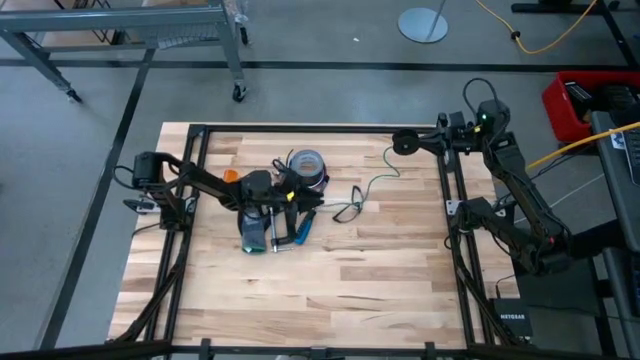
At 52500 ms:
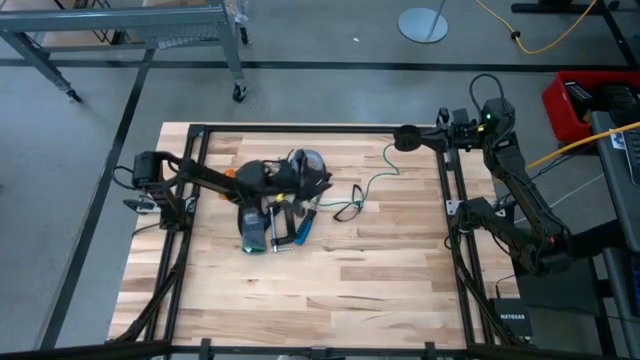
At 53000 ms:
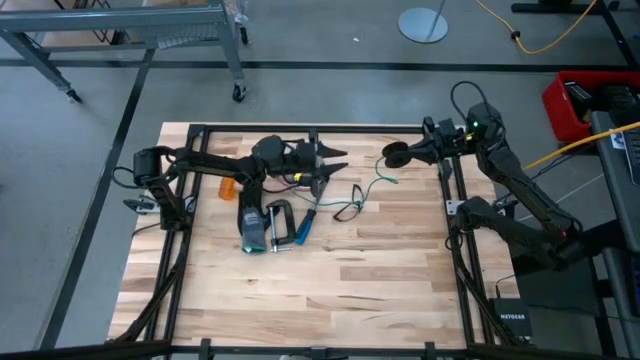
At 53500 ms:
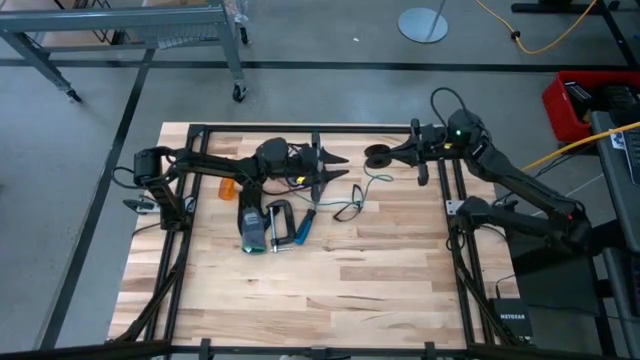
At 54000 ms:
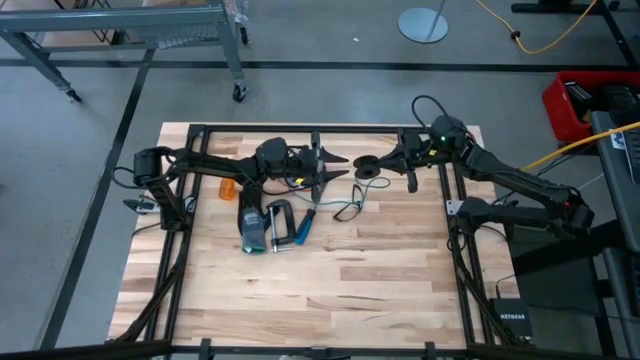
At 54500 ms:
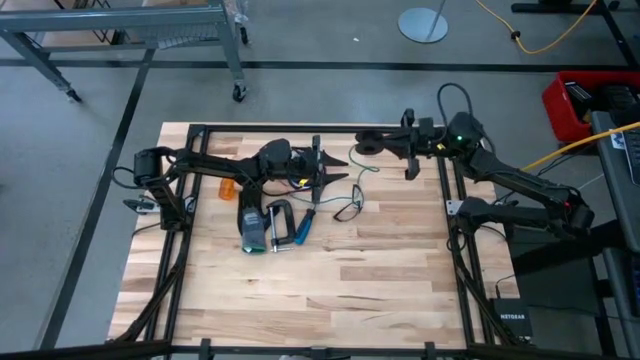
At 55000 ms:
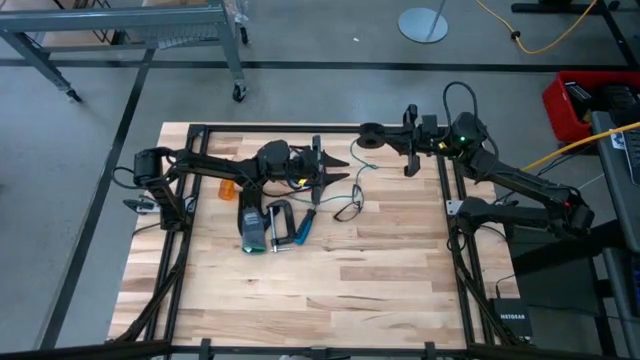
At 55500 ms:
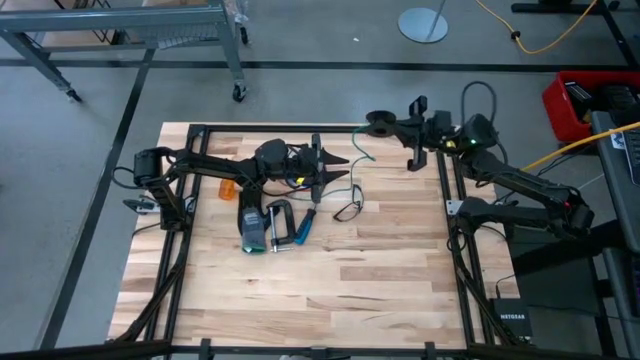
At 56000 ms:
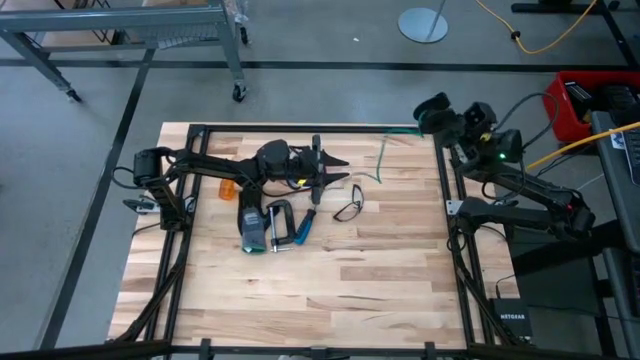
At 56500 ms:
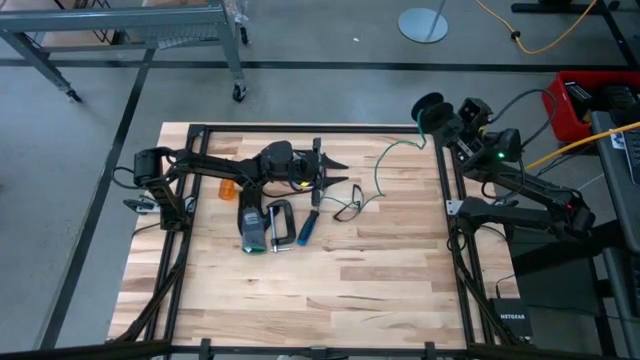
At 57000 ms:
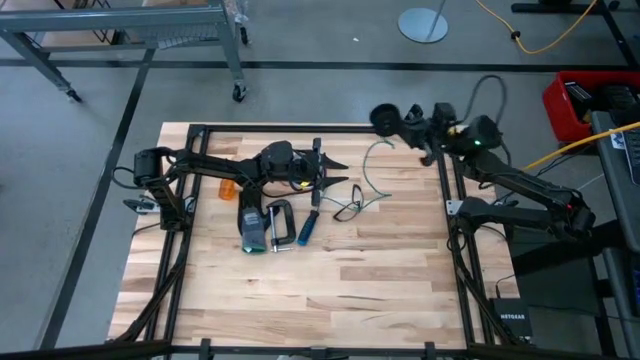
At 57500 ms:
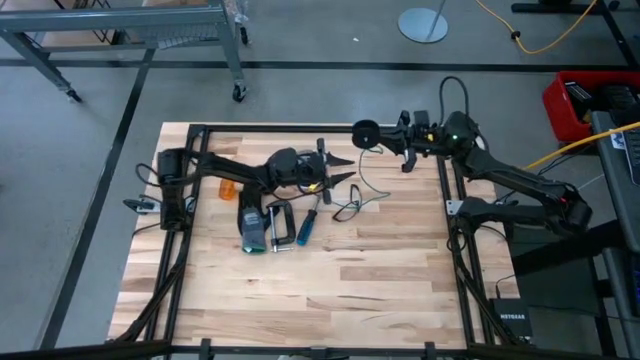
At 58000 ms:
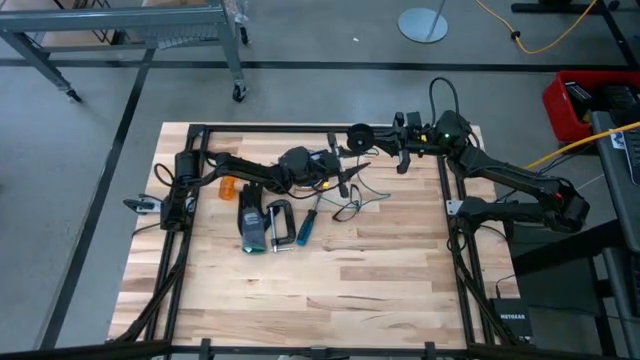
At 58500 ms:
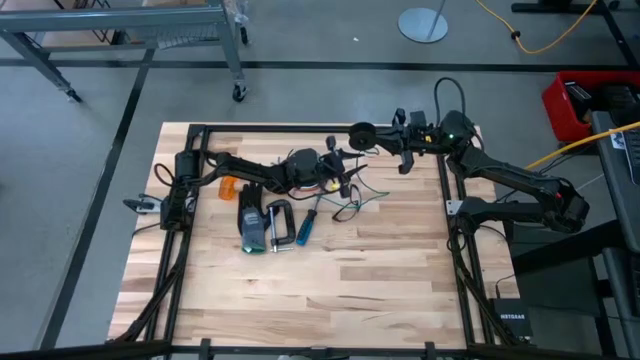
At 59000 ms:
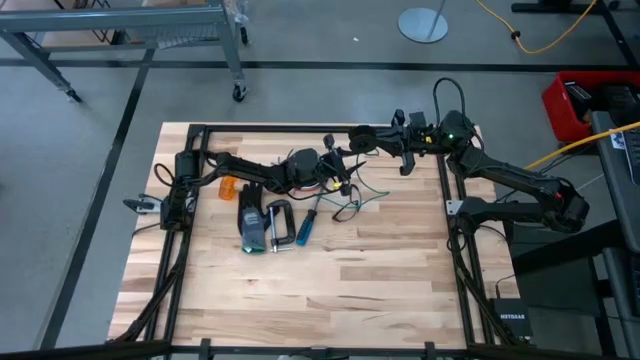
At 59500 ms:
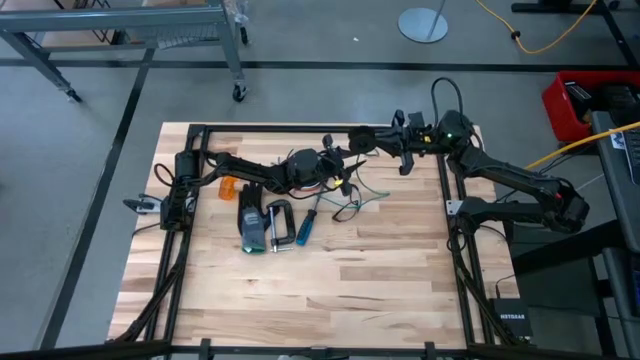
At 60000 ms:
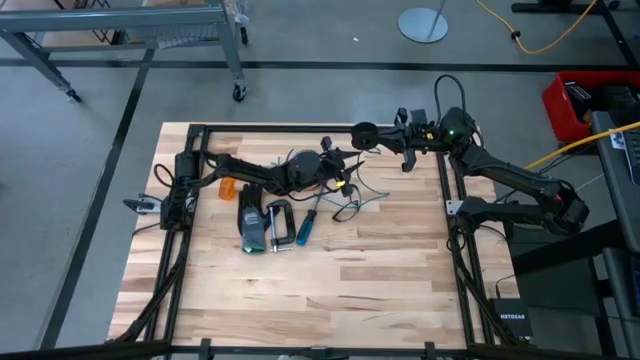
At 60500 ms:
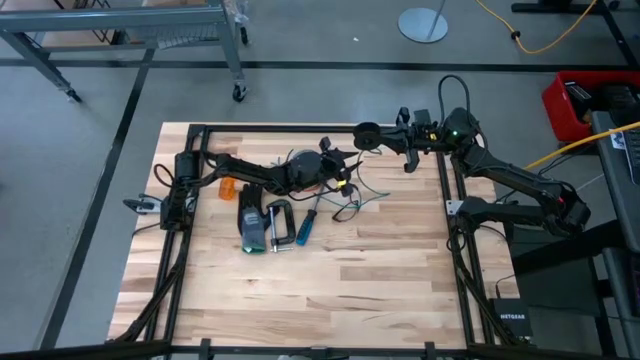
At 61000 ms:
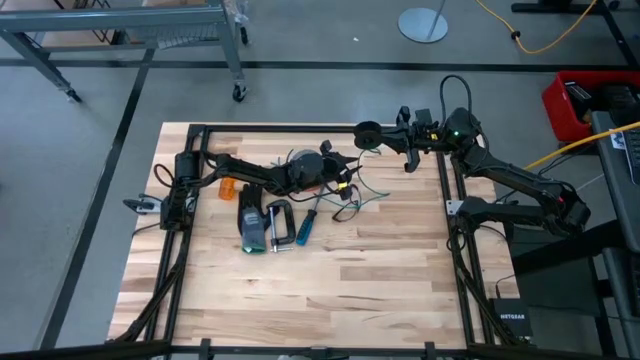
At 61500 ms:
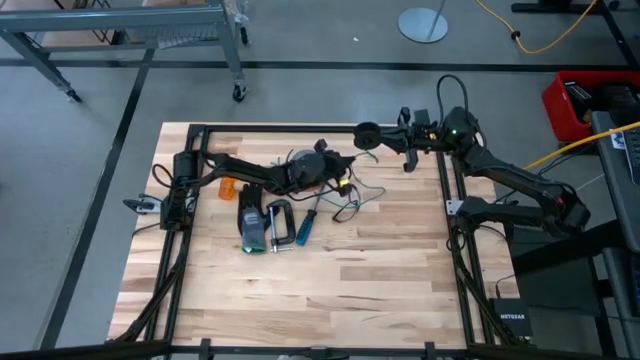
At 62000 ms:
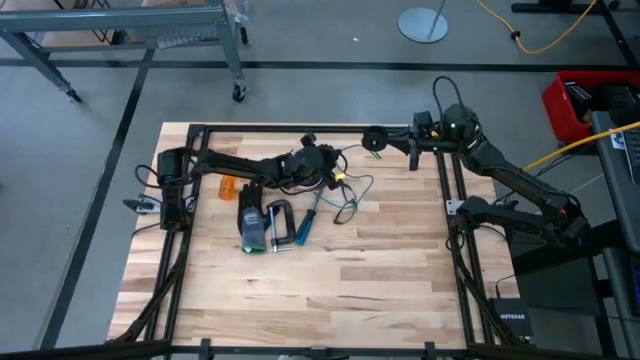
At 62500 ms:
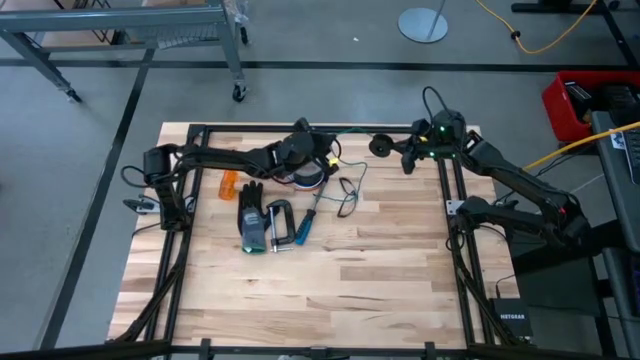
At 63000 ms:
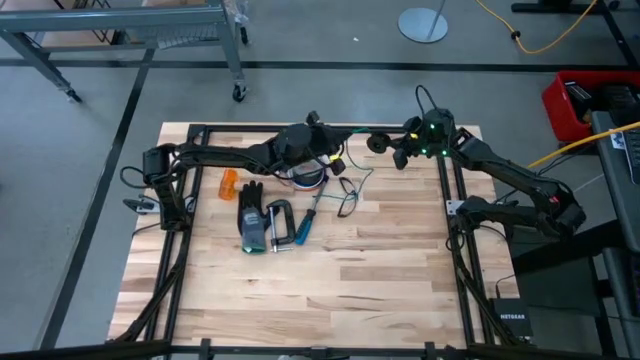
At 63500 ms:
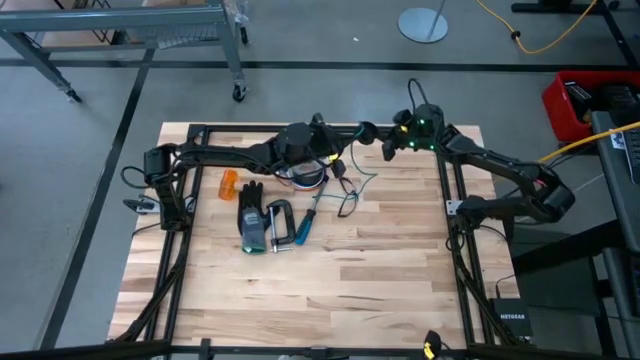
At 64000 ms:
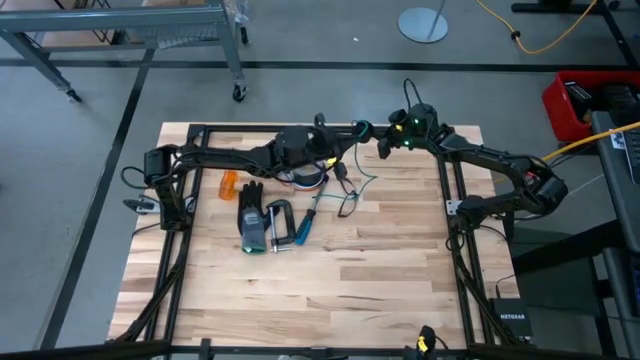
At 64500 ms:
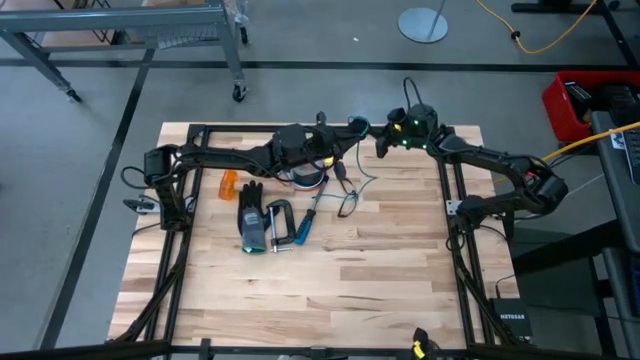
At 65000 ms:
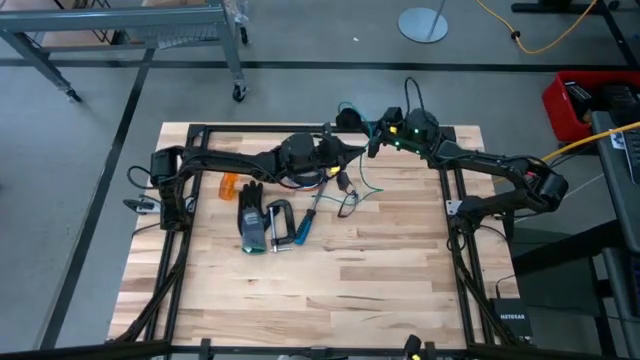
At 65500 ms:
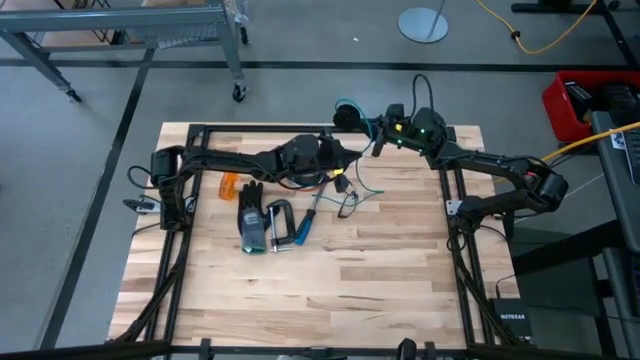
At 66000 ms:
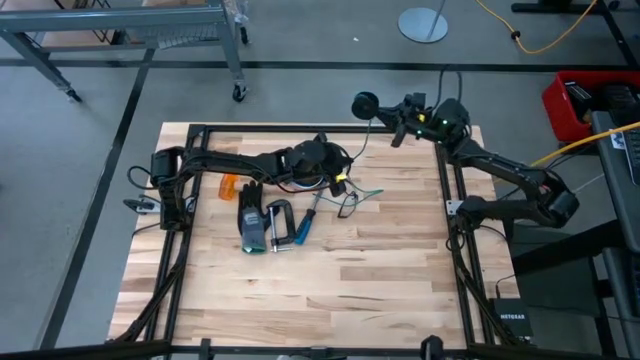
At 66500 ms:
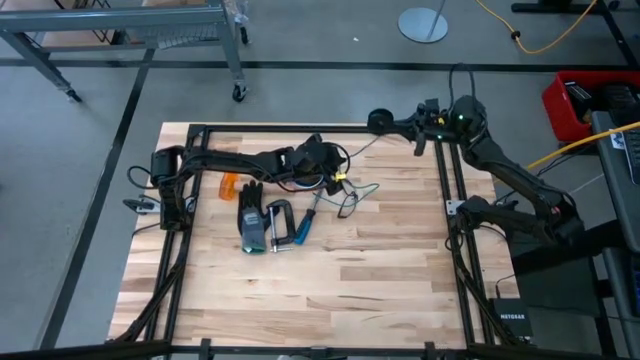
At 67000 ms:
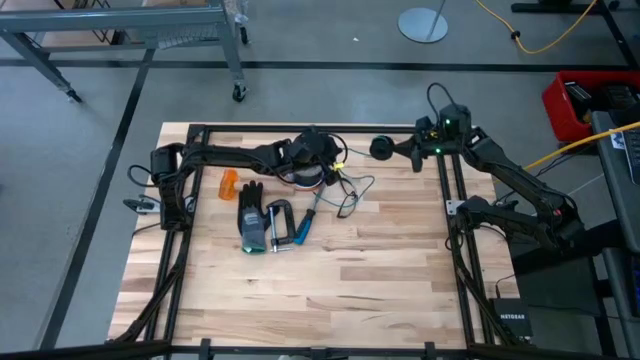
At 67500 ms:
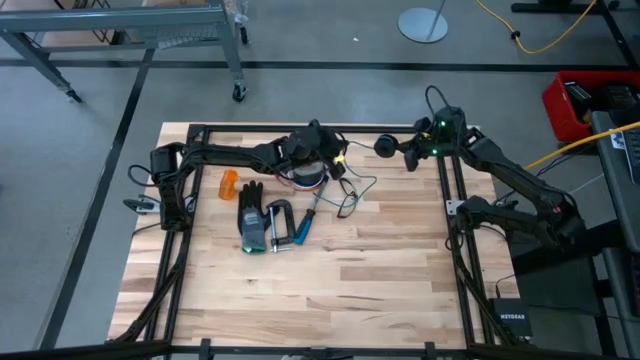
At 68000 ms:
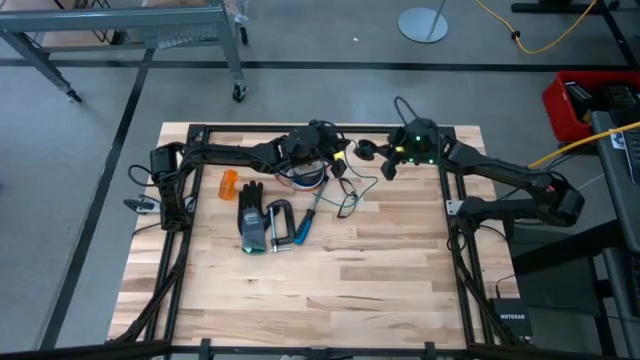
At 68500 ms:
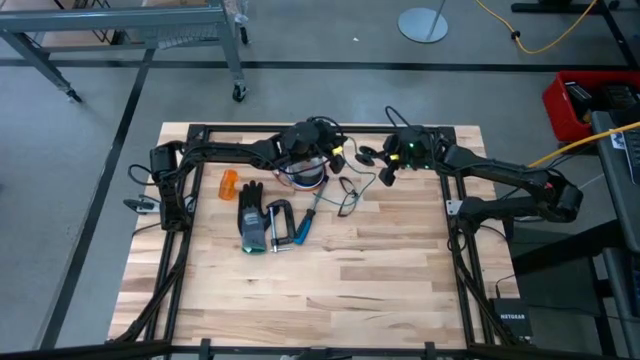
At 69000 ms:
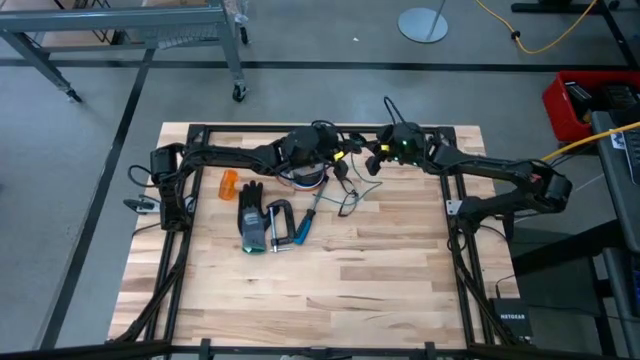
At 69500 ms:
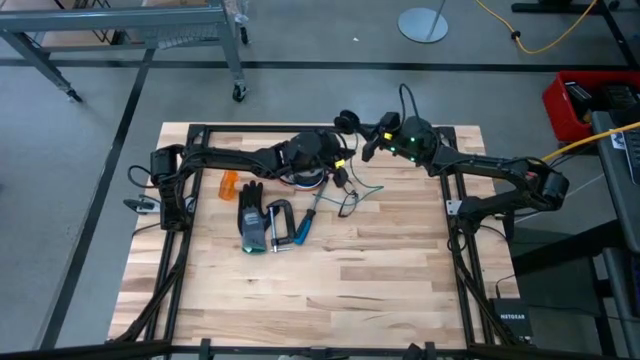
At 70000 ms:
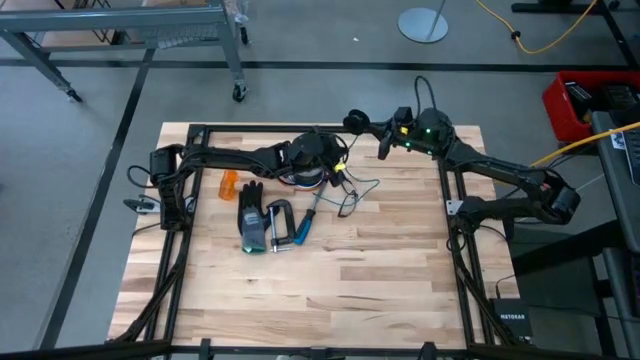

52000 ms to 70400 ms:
Task: Coil cords
Coil the wire in the cable spool
